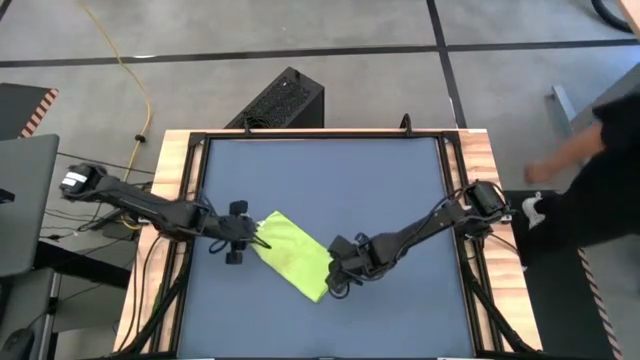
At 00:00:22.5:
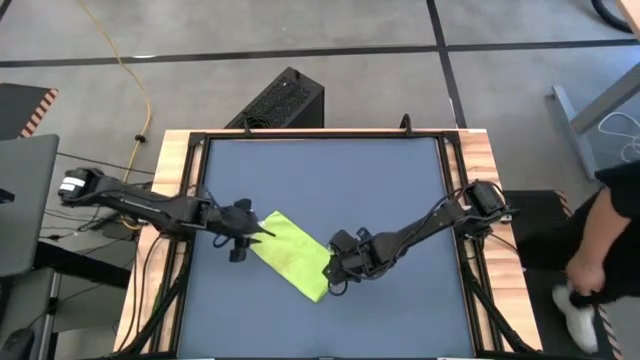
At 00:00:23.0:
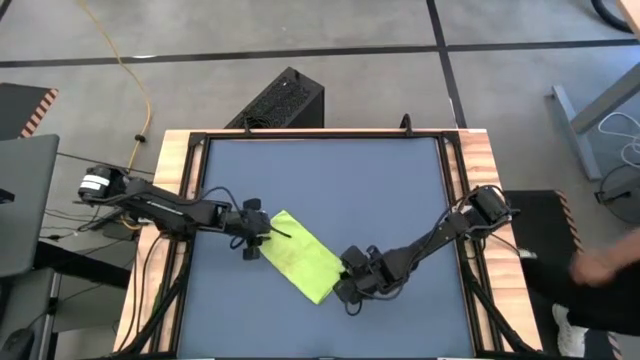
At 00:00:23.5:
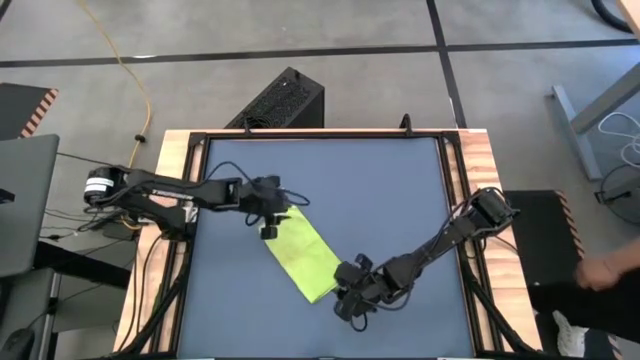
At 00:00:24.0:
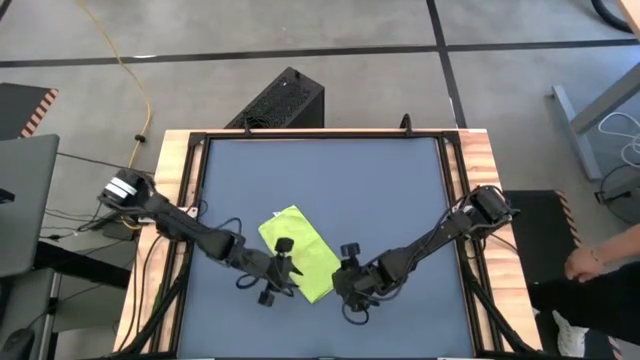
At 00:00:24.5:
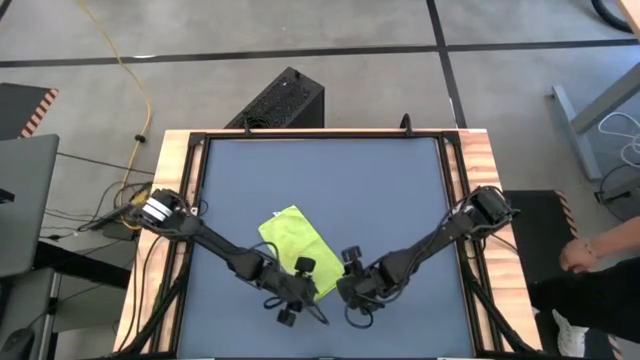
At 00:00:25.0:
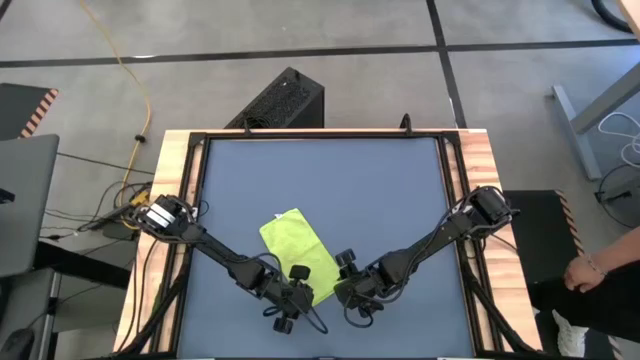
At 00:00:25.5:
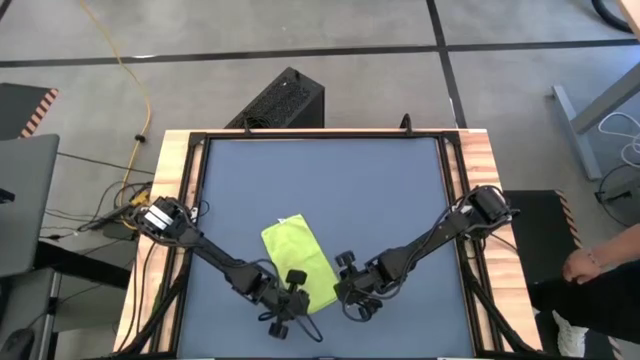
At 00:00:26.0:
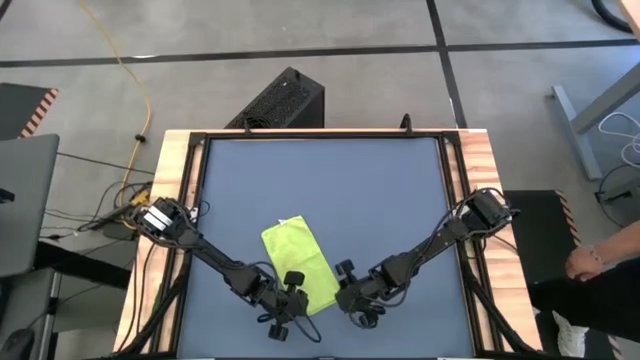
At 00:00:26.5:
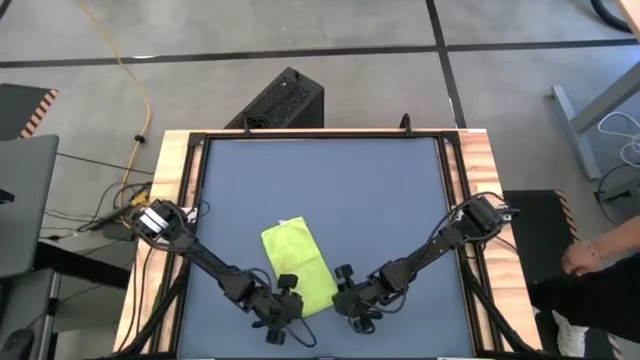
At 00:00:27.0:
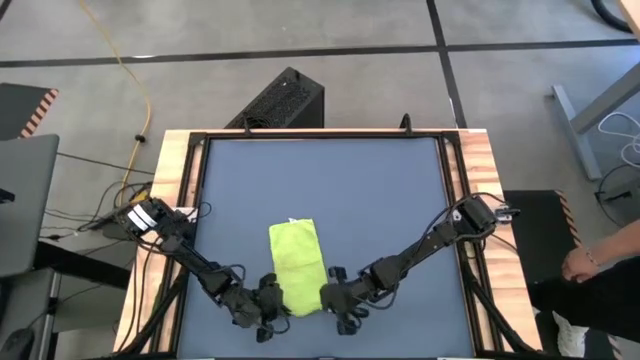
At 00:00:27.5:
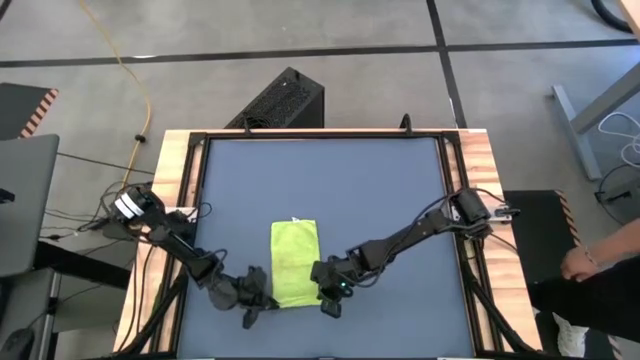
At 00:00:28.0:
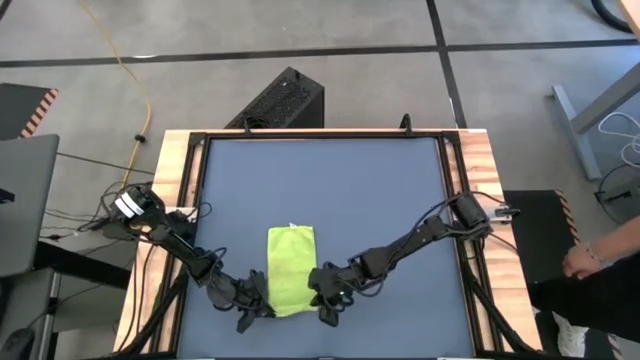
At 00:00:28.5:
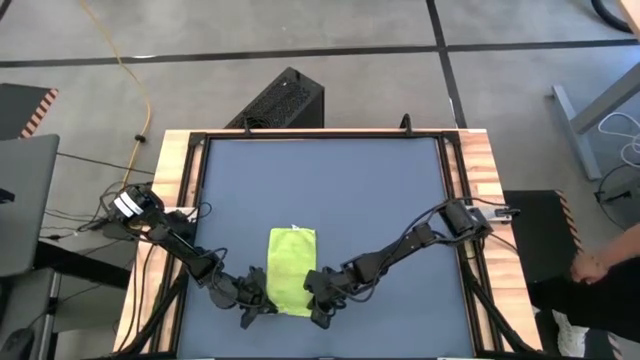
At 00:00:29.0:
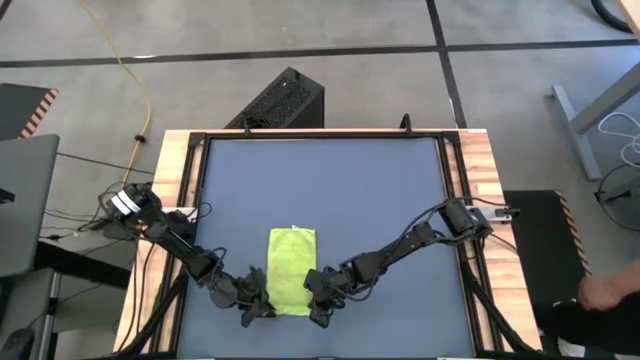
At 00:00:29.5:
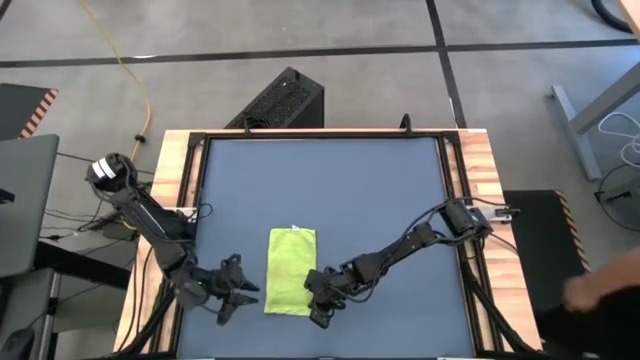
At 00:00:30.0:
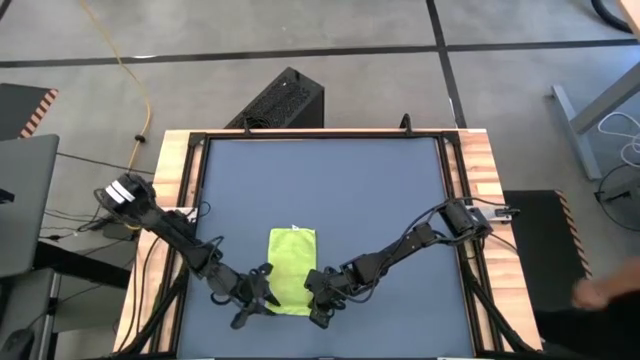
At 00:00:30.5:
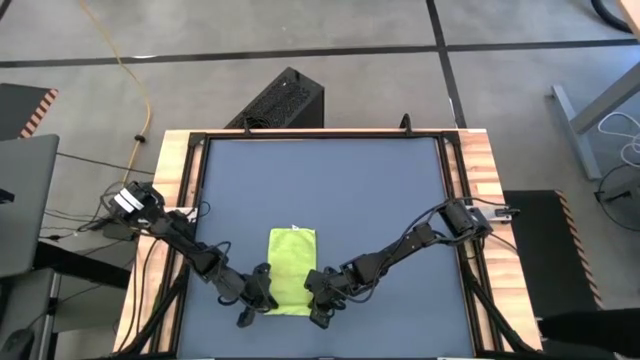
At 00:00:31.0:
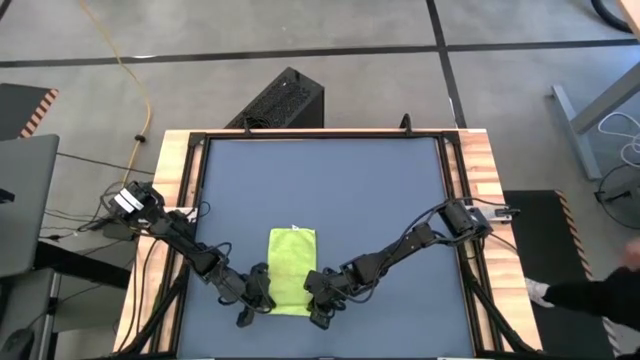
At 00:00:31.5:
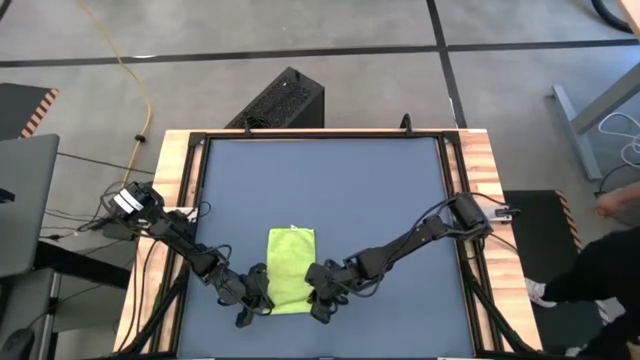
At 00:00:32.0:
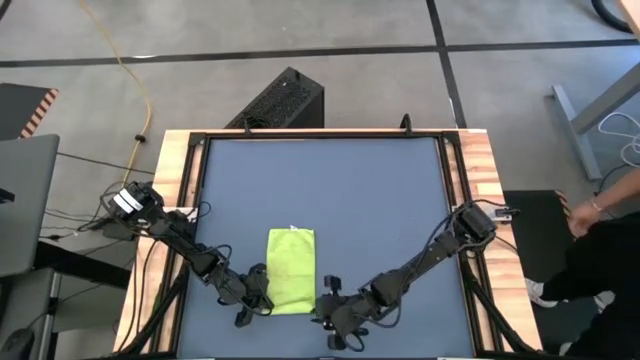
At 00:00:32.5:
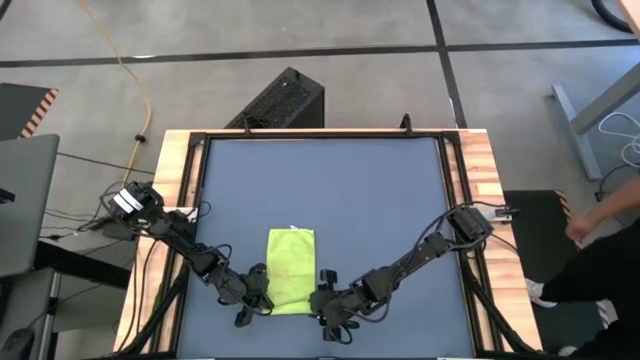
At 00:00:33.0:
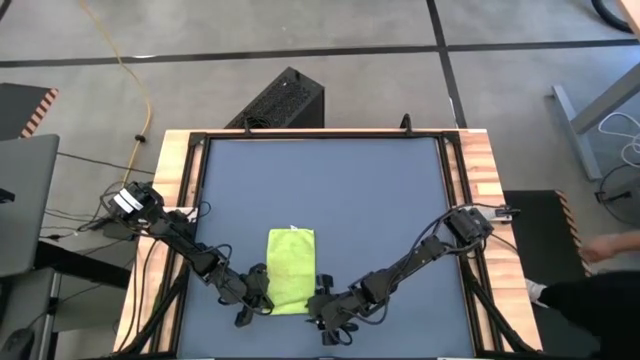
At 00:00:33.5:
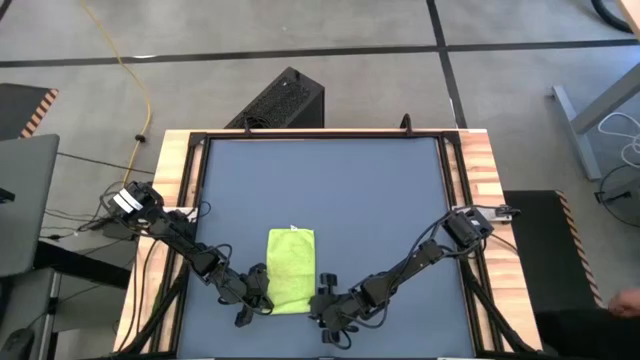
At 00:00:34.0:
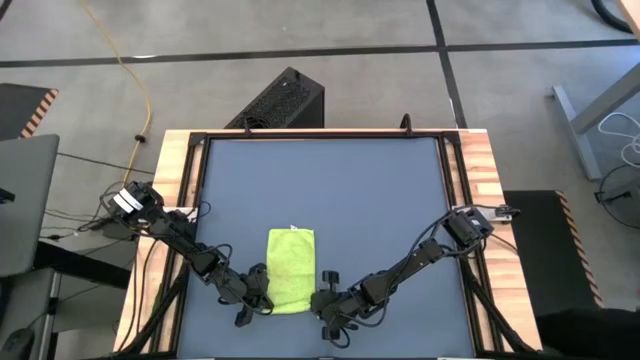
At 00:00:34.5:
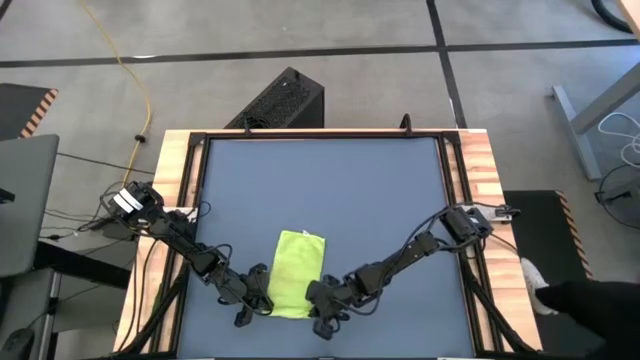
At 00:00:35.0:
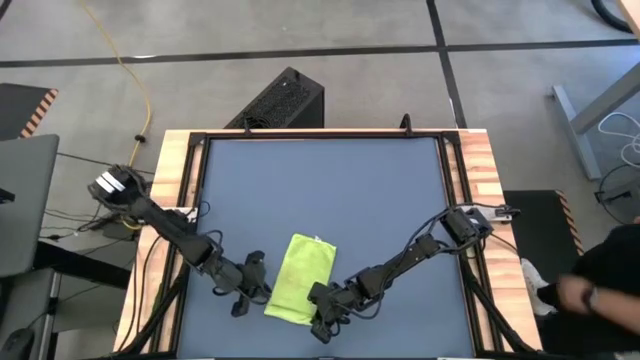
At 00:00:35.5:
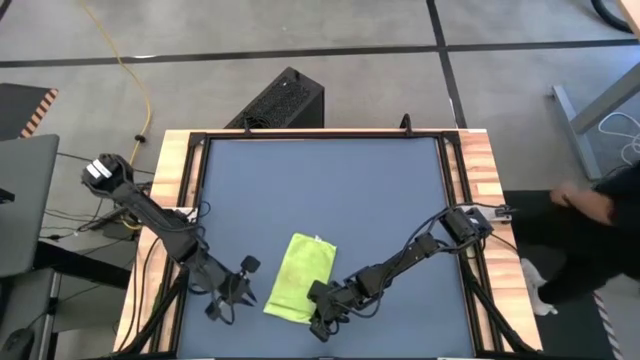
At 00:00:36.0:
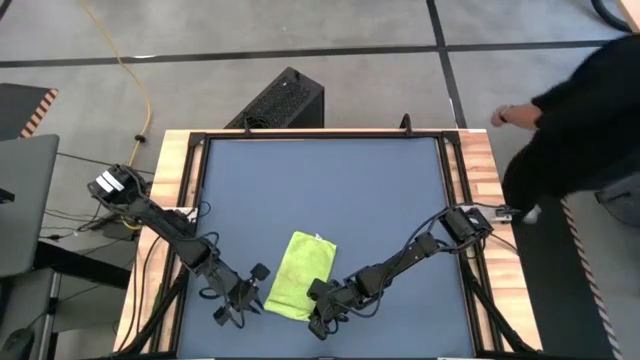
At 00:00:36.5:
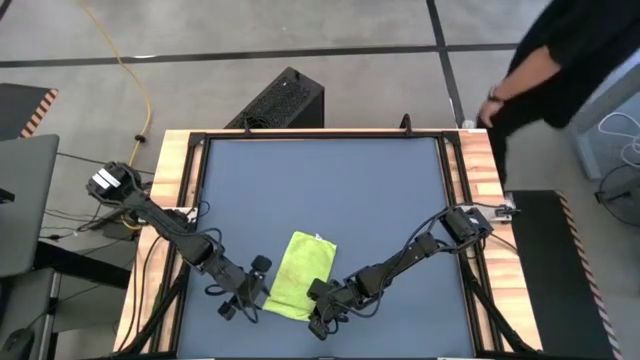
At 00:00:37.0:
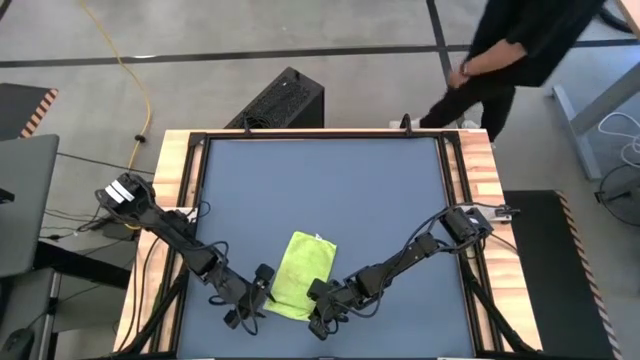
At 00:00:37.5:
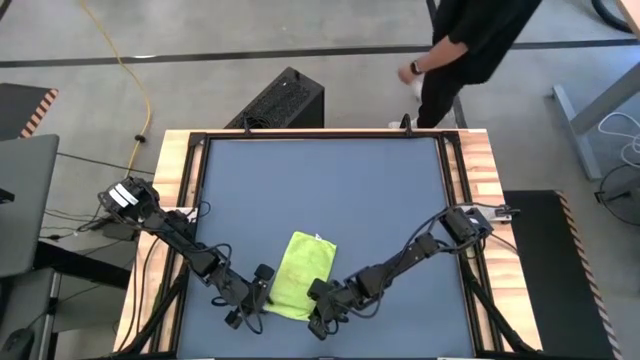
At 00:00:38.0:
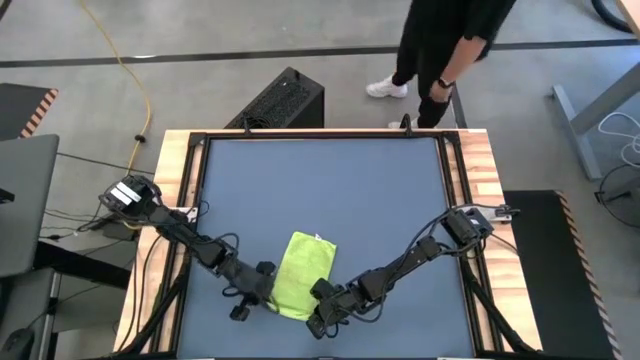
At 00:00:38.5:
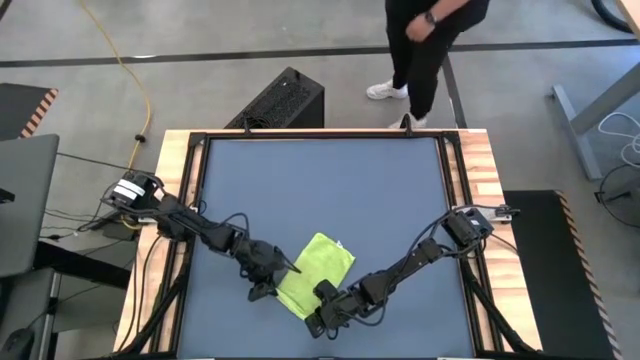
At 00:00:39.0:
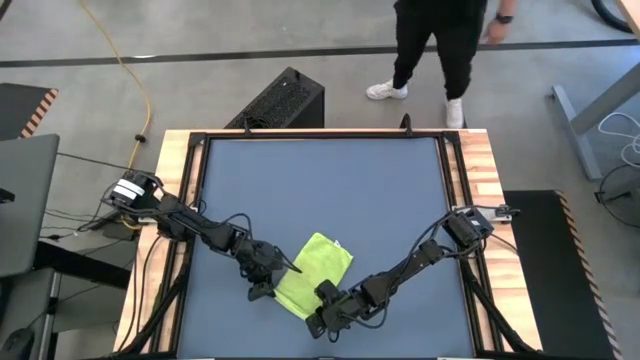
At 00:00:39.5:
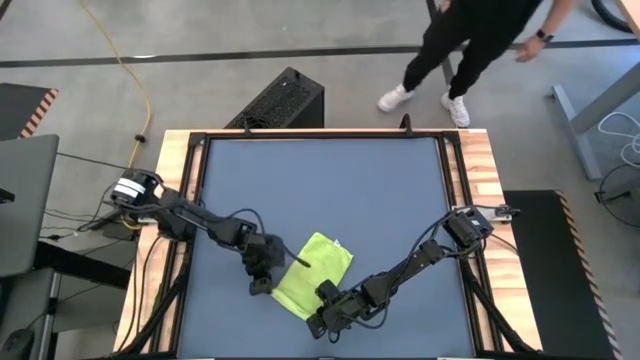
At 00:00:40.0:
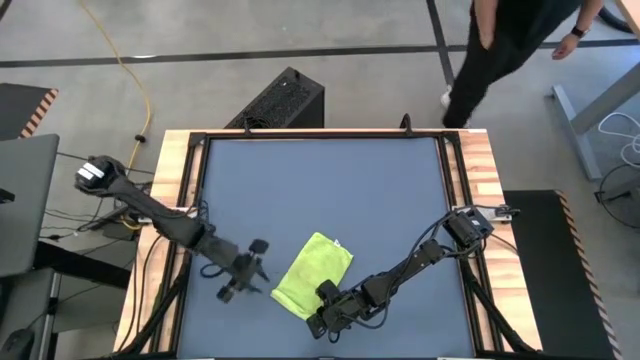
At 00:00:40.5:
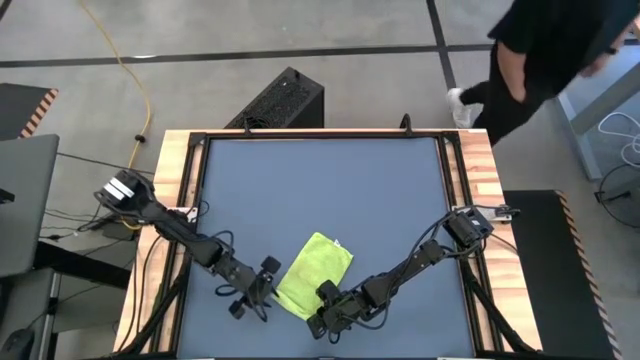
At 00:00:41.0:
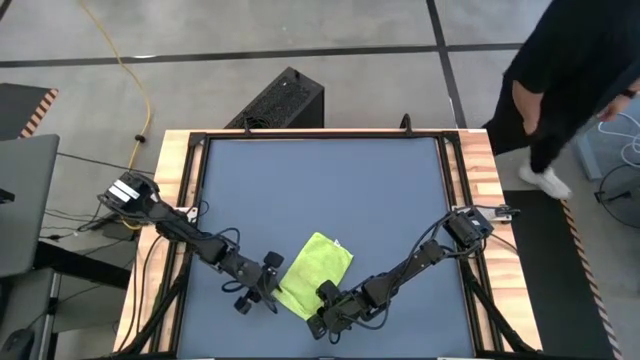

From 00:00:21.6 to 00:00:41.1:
Task: Roll towel
Roll the green towel
